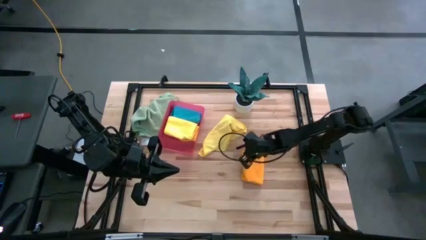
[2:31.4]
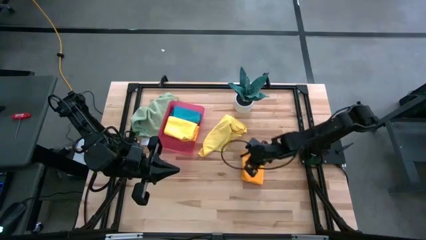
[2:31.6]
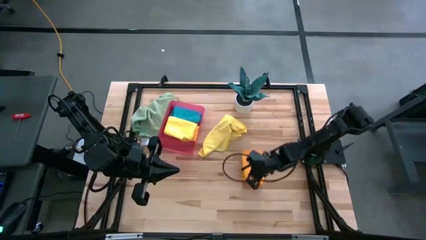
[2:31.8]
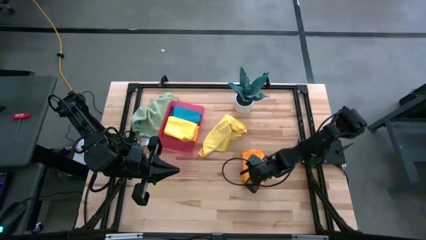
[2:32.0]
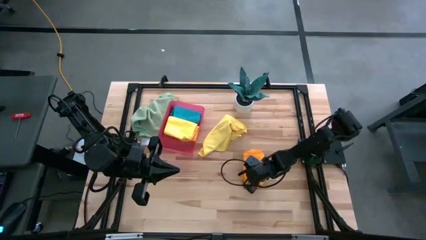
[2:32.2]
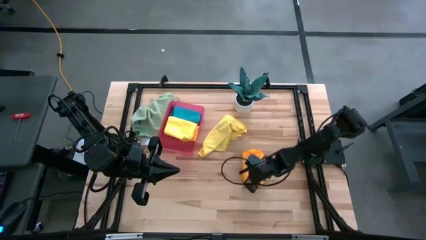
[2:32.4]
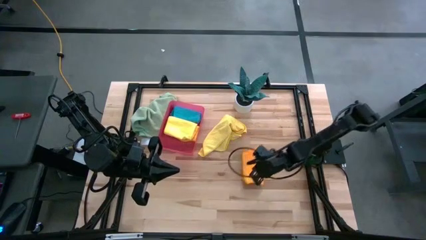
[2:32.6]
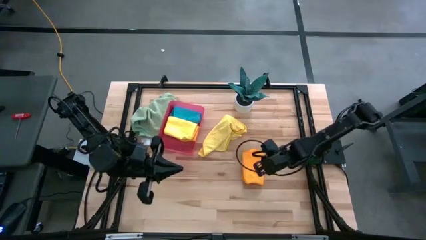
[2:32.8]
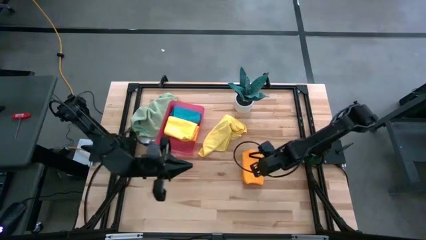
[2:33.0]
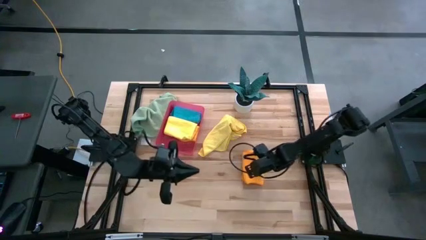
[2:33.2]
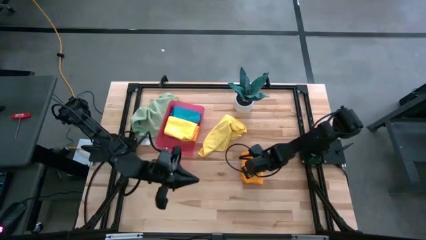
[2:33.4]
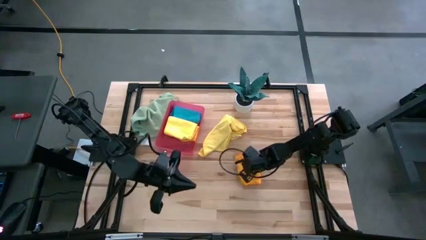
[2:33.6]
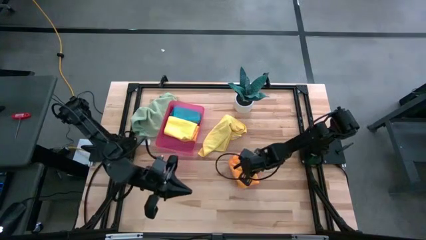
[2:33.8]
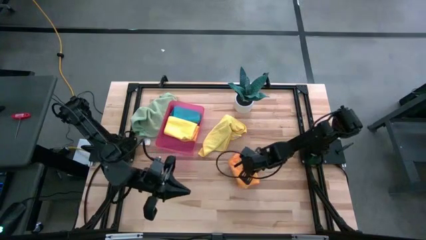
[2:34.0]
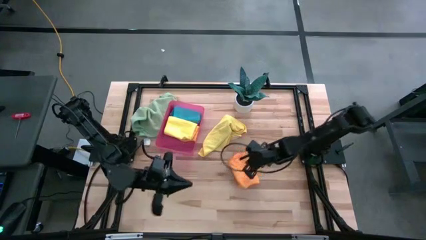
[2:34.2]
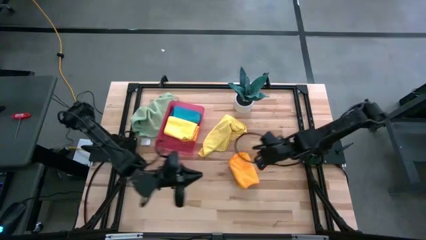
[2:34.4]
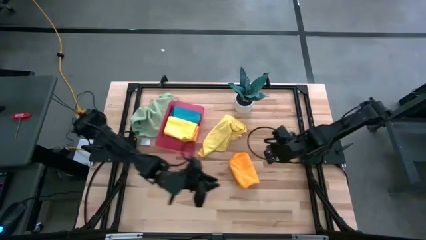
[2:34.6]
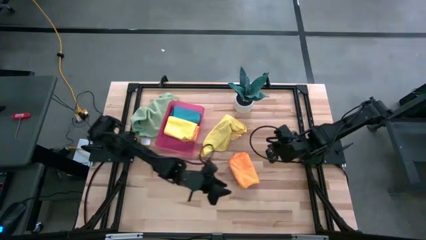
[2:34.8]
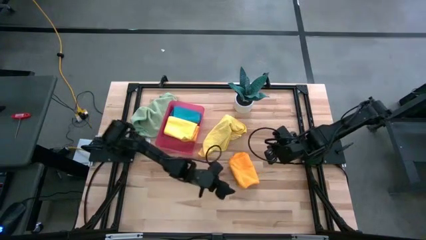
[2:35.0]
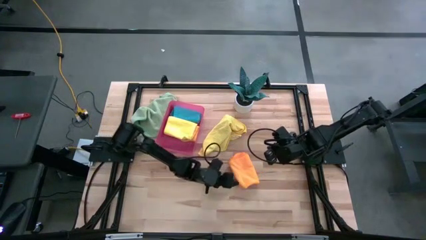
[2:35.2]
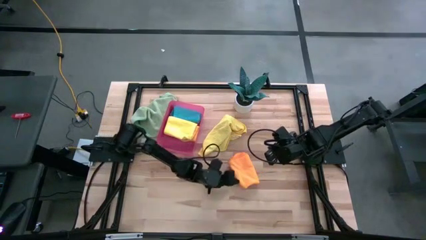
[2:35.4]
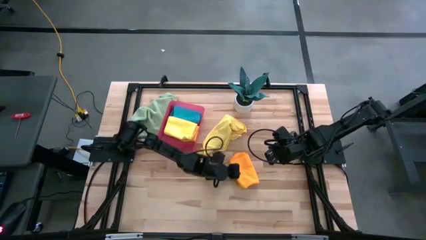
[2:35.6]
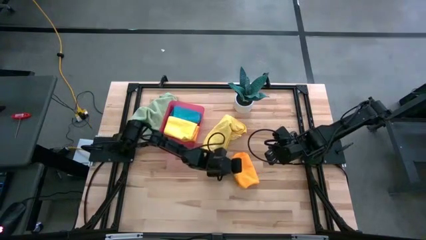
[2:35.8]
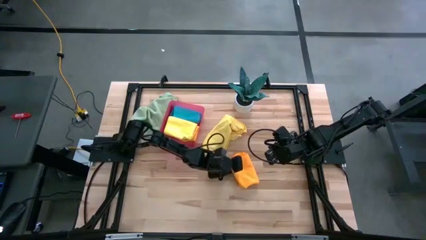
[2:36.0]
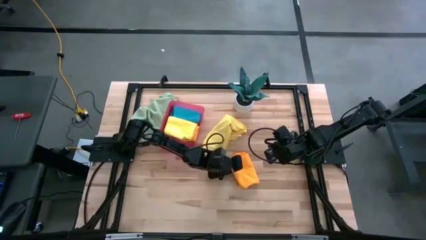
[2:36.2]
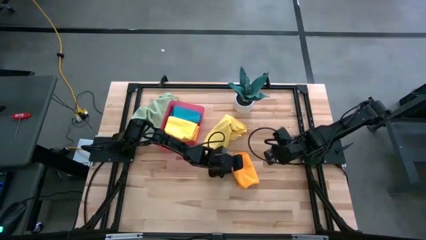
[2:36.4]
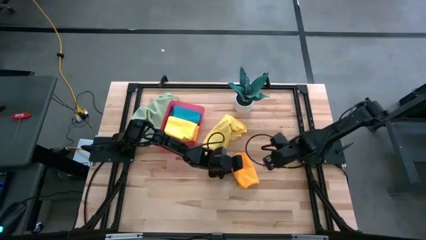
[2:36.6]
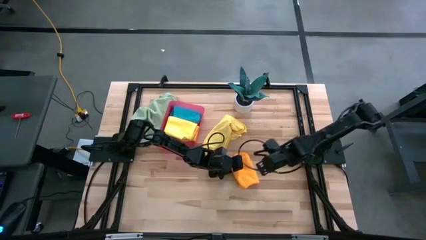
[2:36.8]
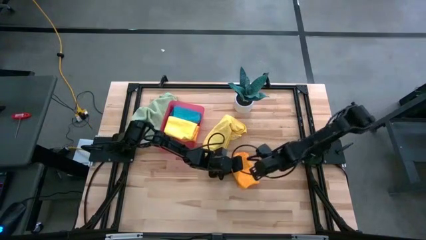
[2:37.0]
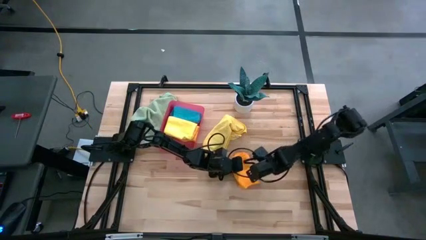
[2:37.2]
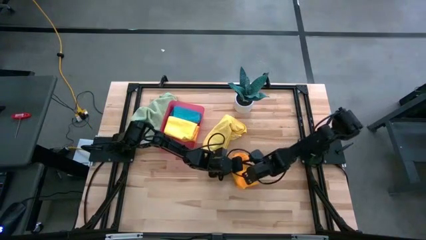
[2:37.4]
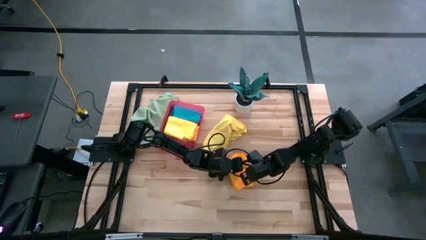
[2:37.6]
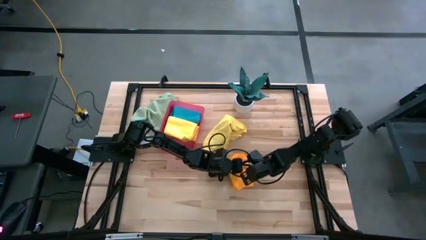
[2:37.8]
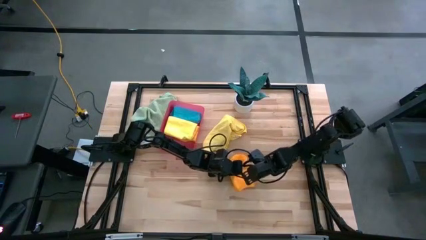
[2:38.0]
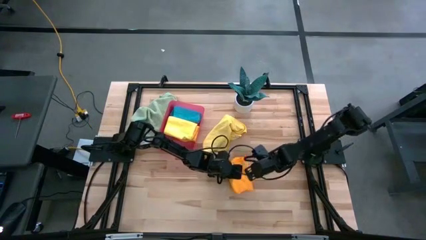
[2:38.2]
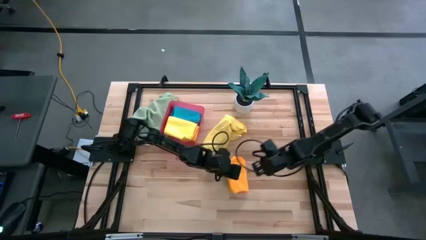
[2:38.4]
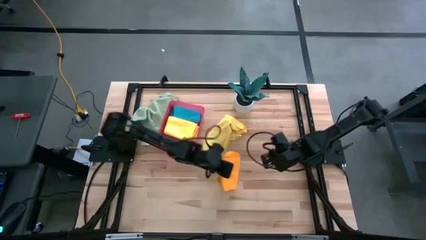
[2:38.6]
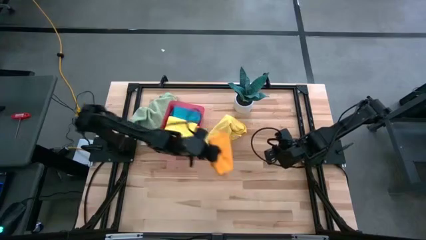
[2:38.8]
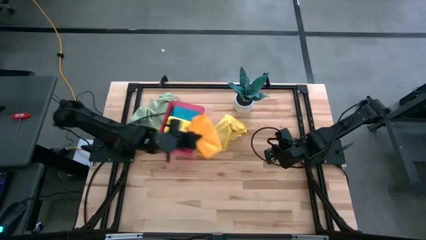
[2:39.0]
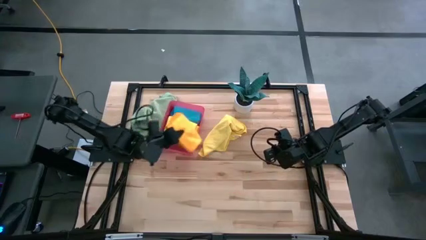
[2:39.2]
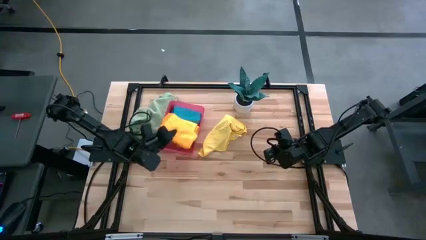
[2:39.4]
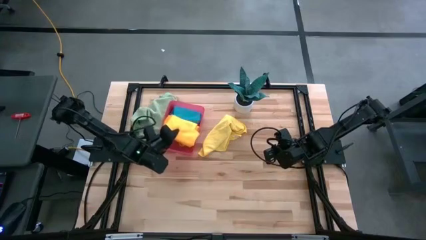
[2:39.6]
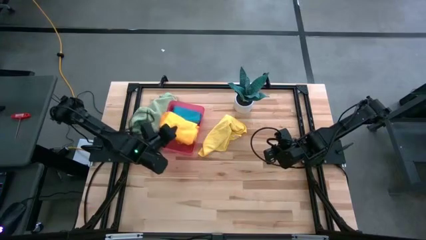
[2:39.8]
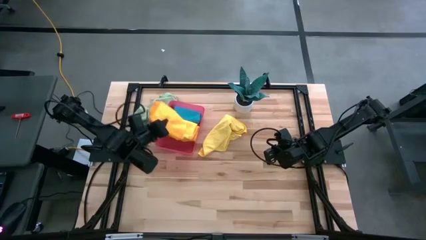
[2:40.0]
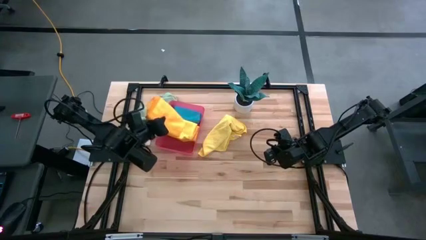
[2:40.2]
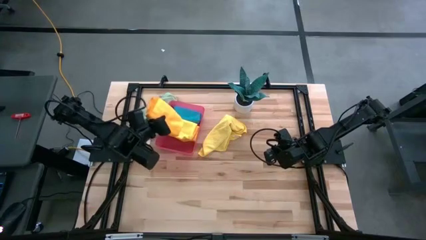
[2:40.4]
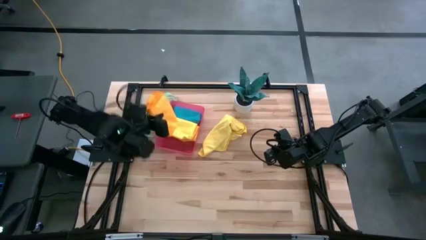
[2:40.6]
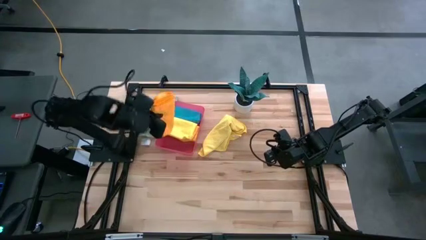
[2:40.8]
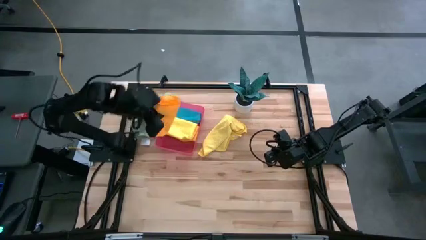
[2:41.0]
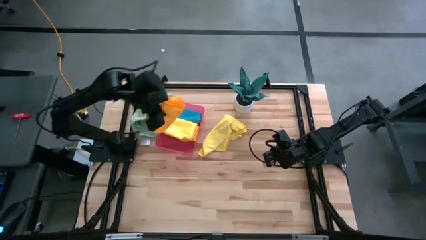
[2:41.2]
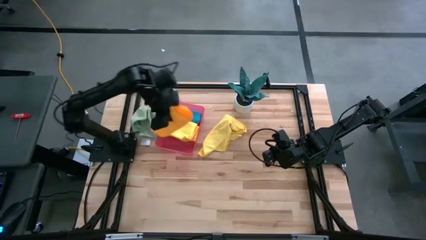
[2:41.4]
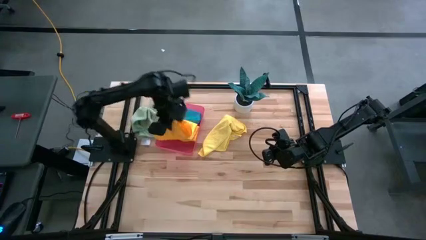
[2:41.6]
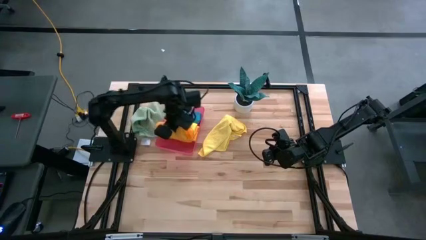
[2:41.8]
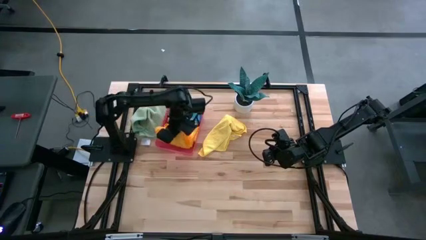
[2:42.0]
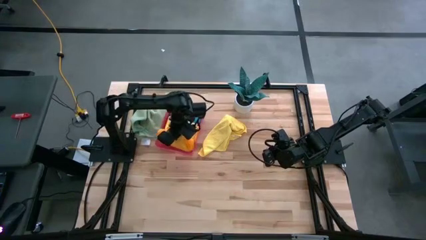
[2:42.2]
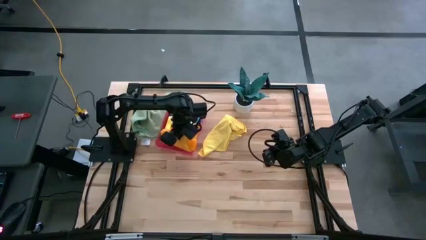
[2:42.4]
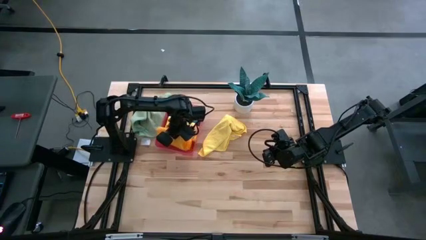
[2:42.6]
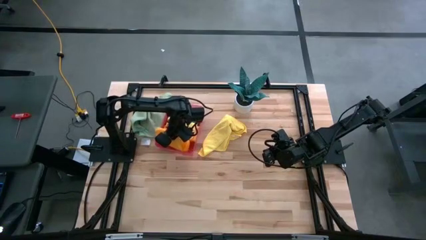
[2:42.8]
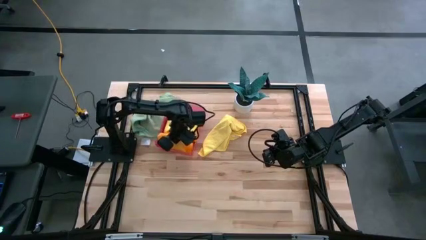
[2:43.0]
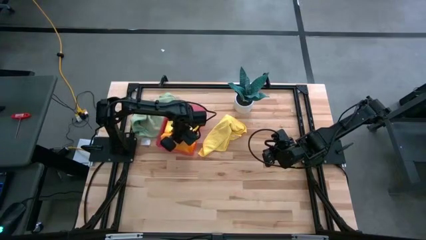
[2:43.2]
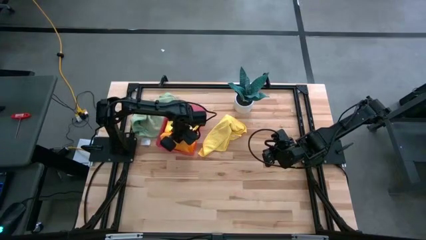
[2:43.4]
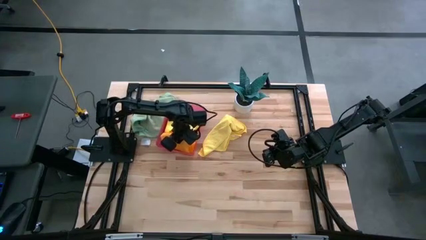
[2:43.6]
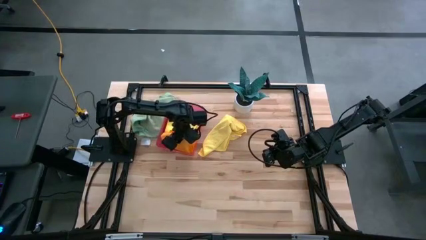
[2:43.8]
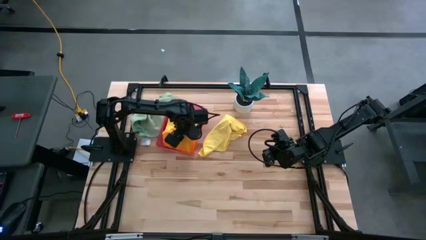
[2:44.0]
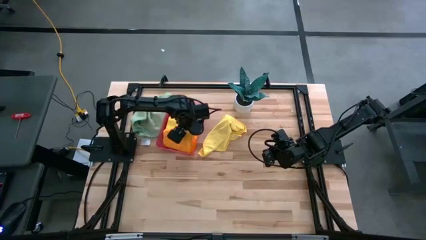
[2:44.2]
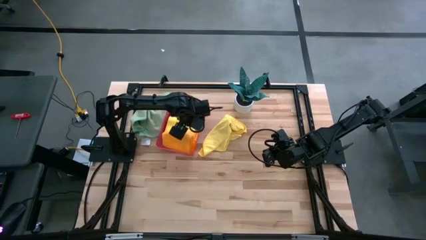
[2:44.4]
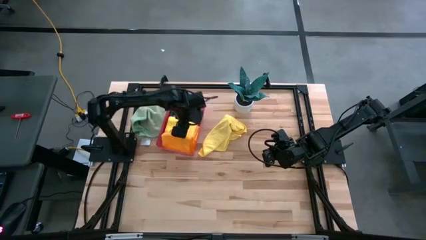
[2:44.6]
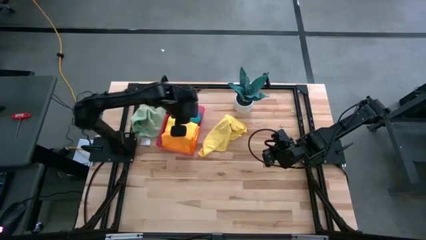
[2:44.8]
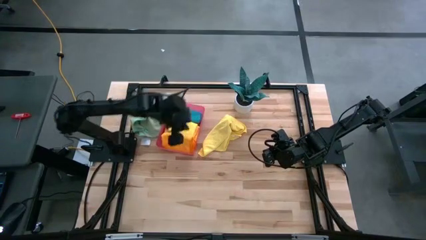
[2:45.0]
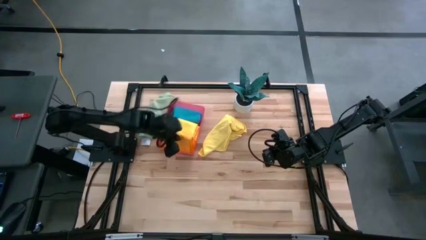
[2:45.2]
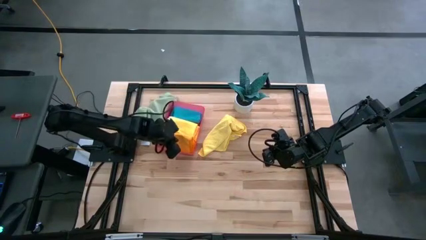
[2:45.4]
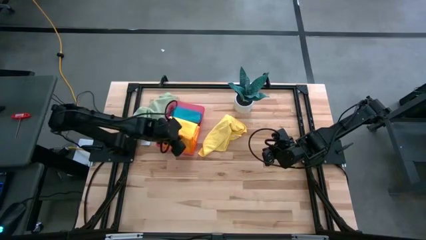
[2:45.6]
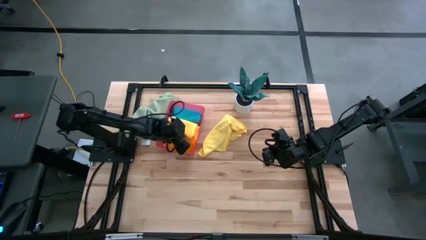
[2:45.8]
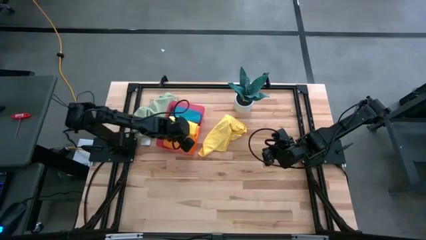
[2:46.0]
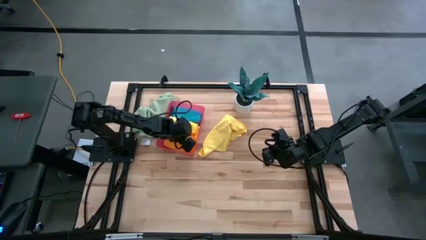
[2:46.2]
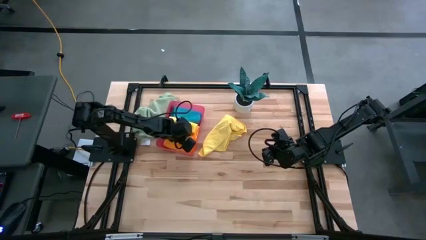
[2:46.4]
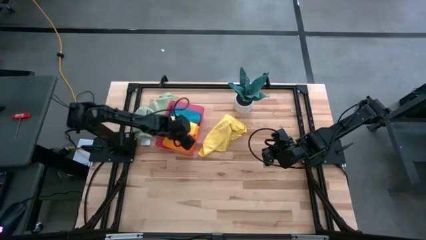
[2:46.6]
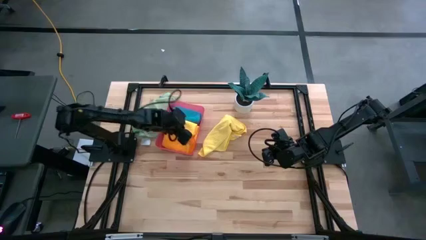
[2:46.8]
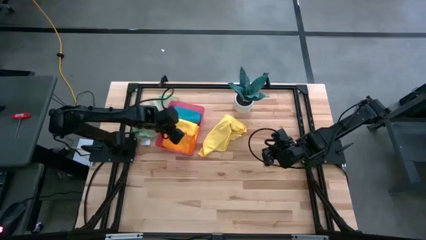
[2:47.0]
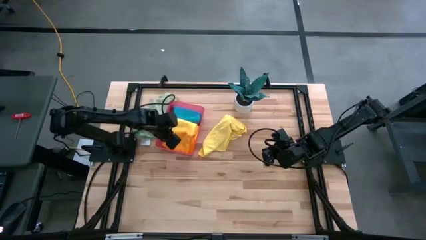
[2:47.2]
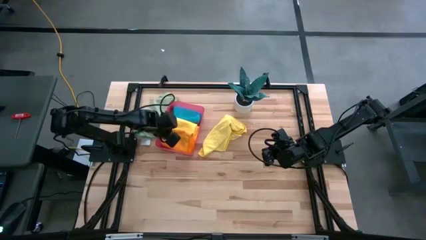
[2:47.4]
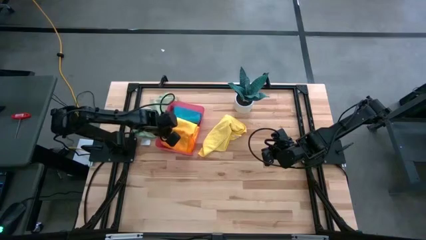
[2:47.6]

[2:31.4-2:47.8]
Task: Fold microfiber towels
Put the orange microfiber cloth into the pink bin
